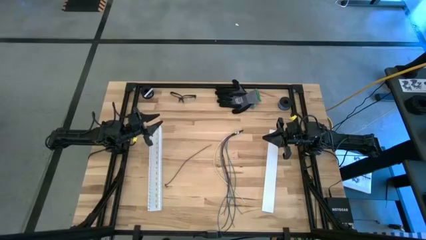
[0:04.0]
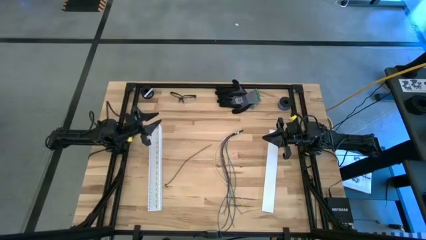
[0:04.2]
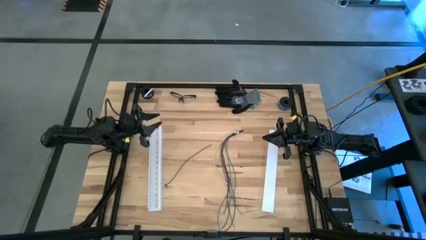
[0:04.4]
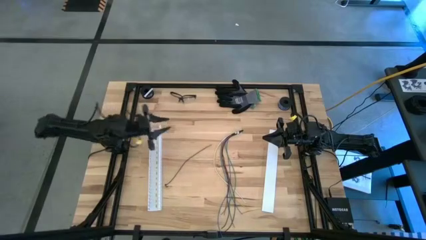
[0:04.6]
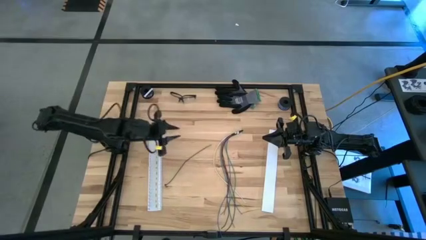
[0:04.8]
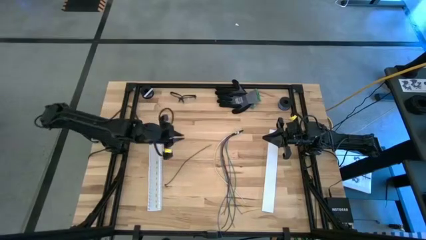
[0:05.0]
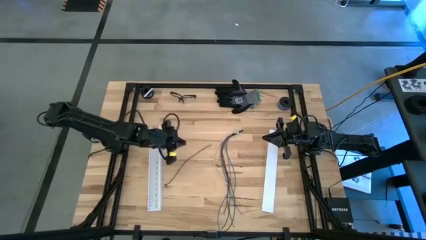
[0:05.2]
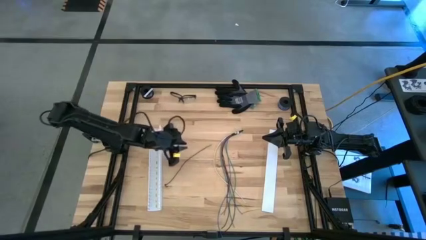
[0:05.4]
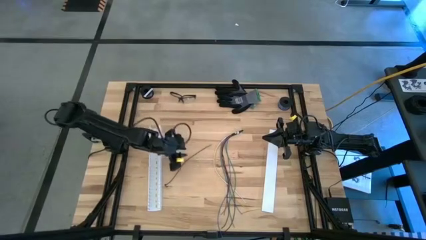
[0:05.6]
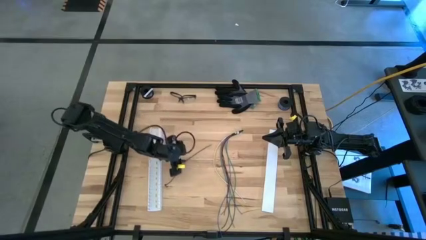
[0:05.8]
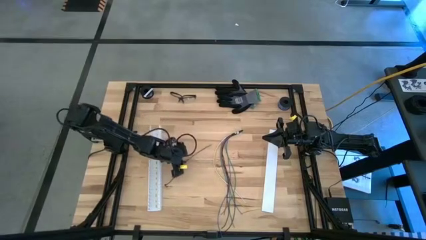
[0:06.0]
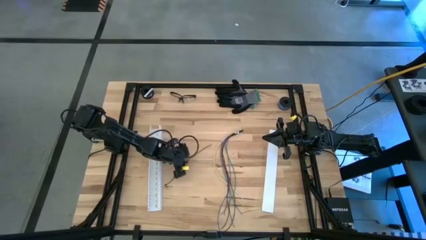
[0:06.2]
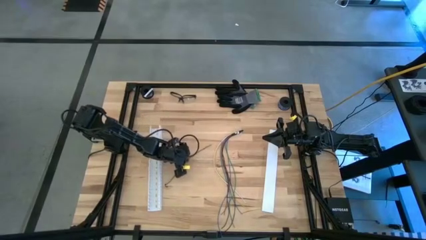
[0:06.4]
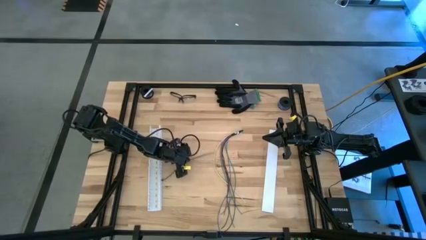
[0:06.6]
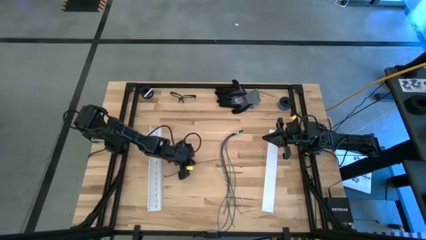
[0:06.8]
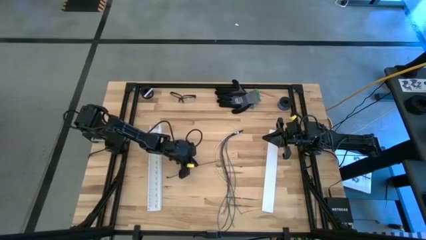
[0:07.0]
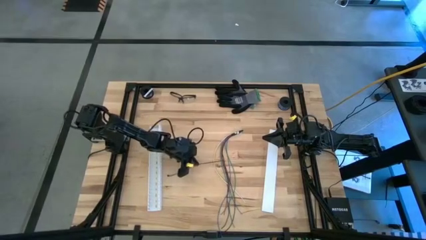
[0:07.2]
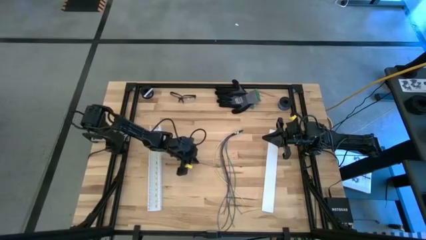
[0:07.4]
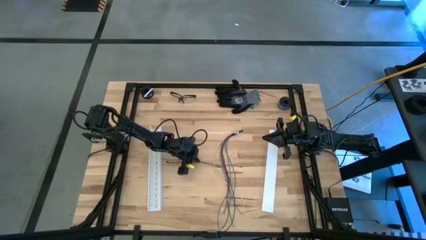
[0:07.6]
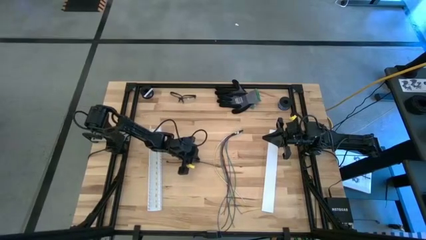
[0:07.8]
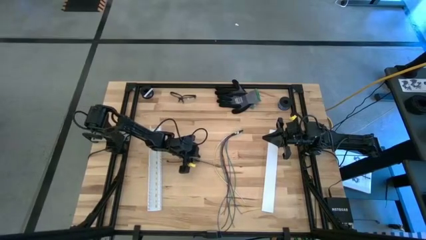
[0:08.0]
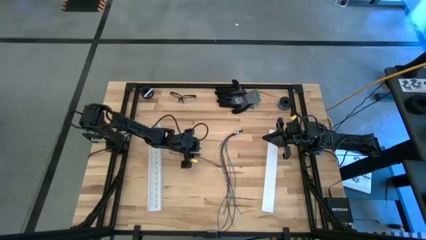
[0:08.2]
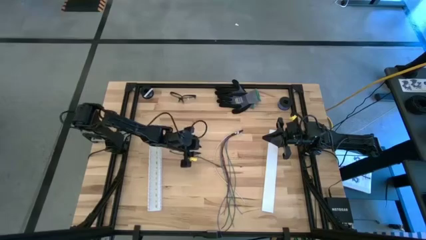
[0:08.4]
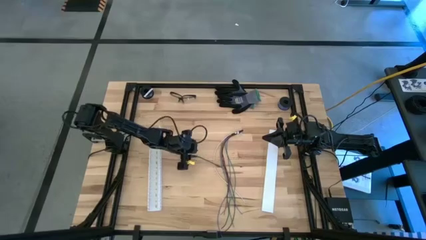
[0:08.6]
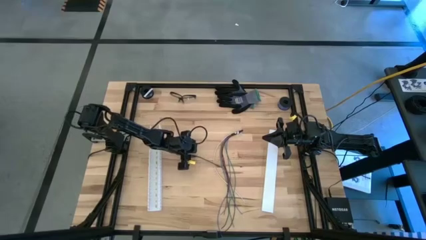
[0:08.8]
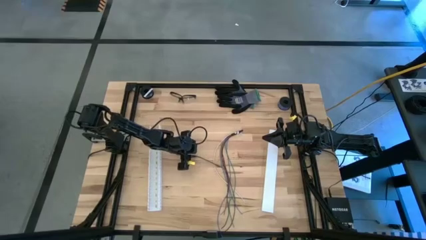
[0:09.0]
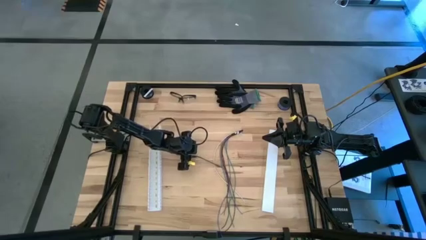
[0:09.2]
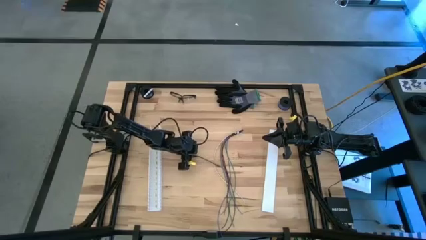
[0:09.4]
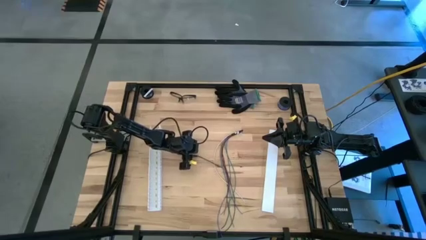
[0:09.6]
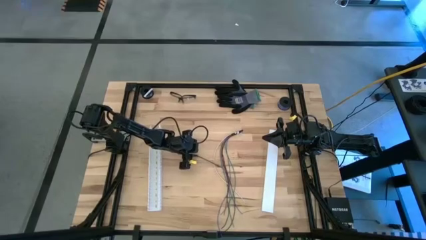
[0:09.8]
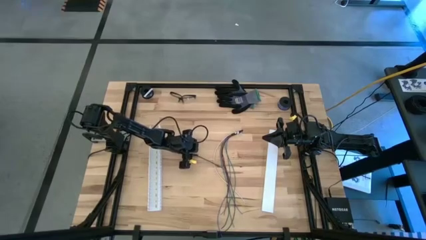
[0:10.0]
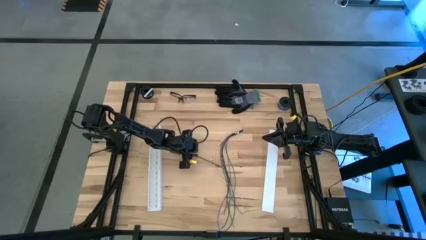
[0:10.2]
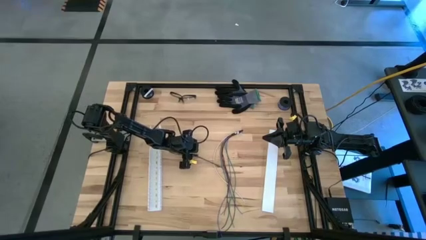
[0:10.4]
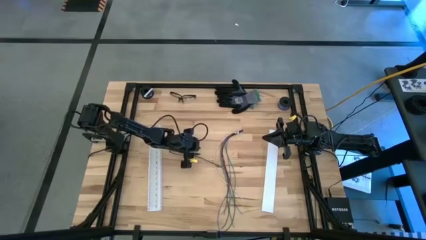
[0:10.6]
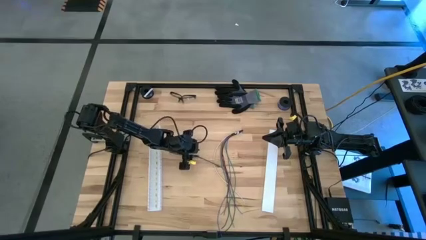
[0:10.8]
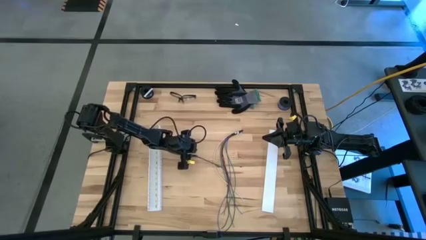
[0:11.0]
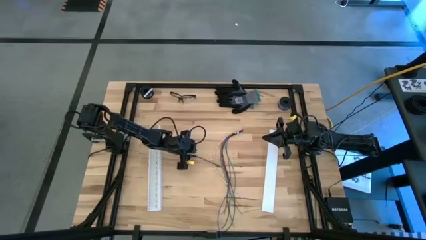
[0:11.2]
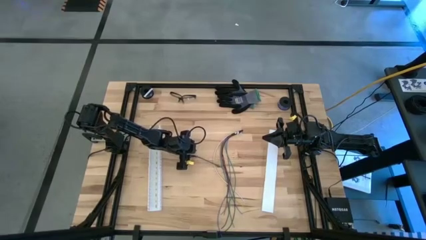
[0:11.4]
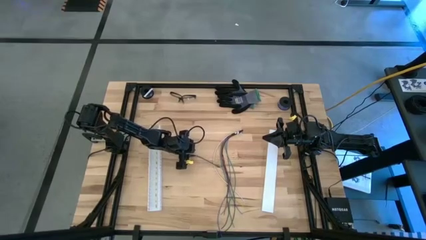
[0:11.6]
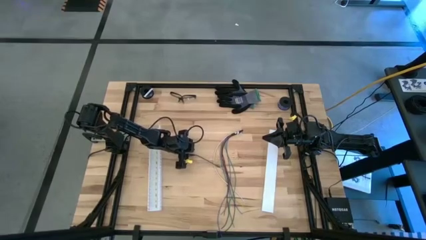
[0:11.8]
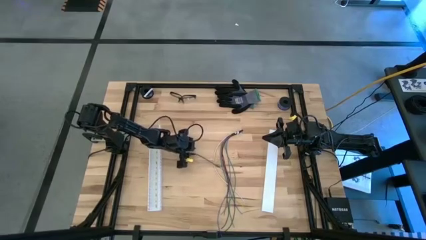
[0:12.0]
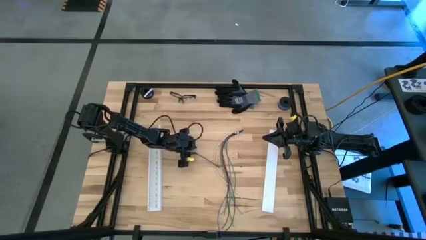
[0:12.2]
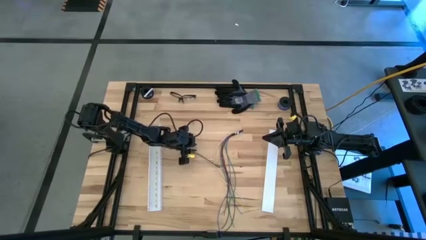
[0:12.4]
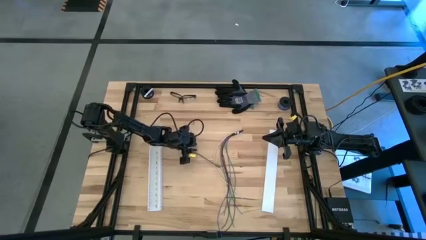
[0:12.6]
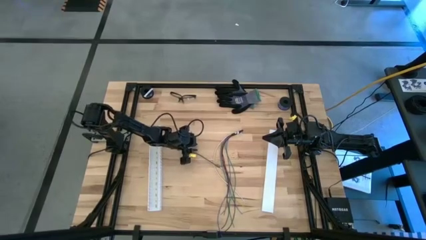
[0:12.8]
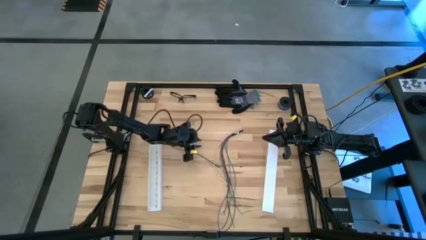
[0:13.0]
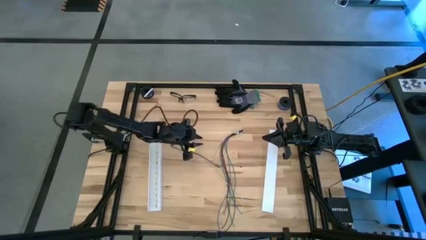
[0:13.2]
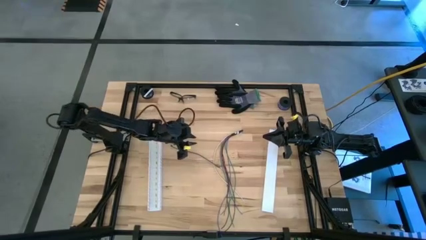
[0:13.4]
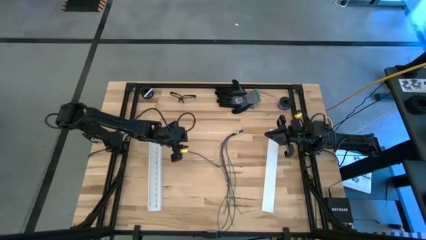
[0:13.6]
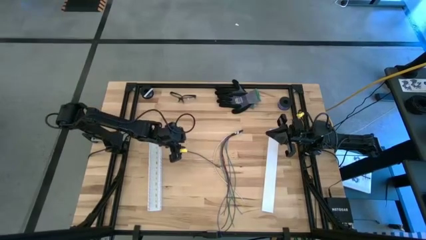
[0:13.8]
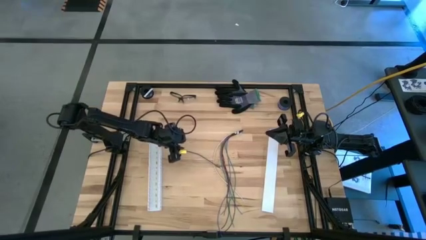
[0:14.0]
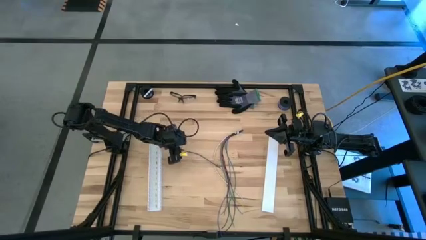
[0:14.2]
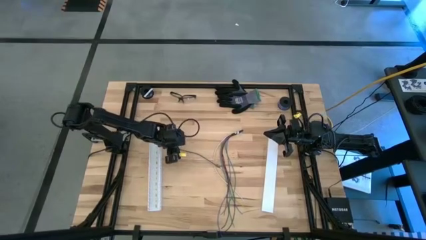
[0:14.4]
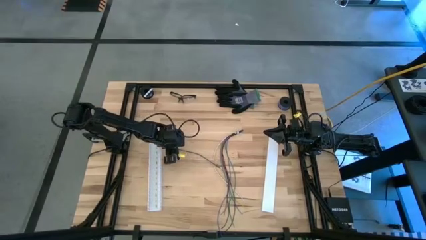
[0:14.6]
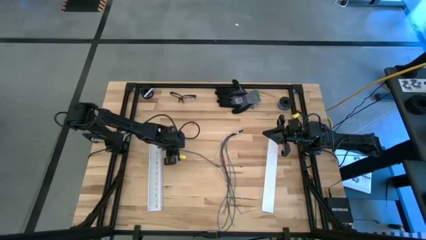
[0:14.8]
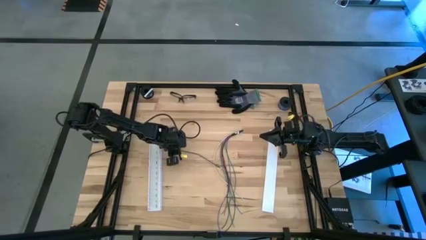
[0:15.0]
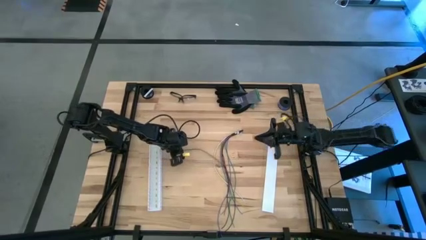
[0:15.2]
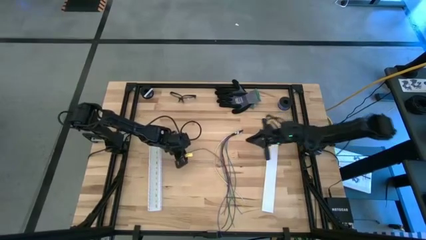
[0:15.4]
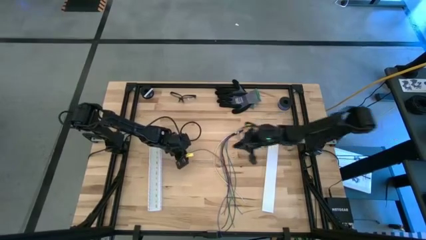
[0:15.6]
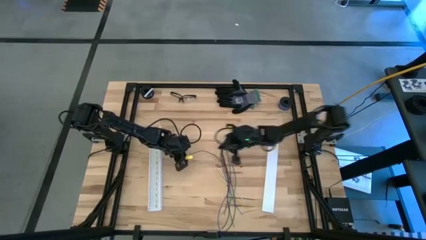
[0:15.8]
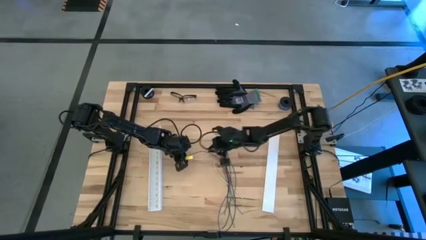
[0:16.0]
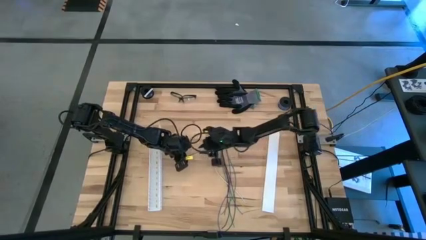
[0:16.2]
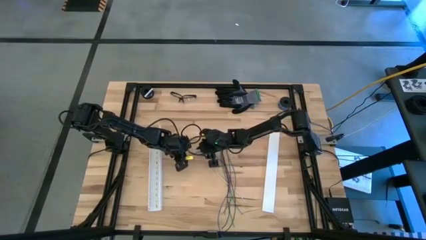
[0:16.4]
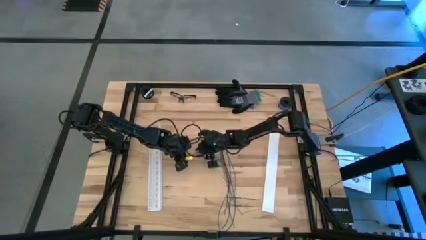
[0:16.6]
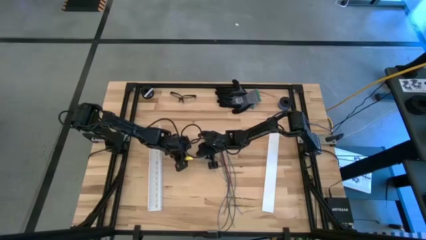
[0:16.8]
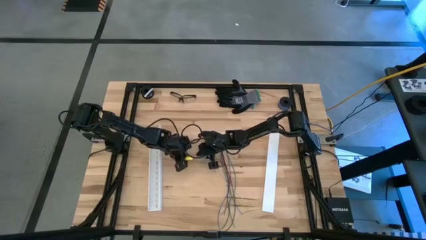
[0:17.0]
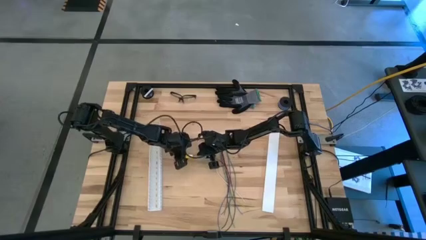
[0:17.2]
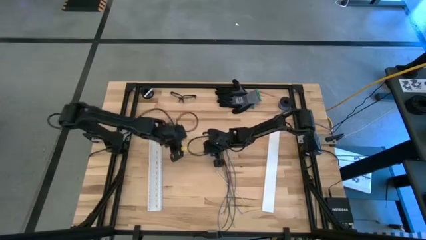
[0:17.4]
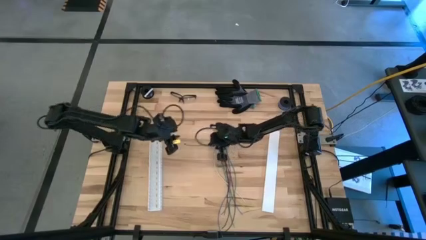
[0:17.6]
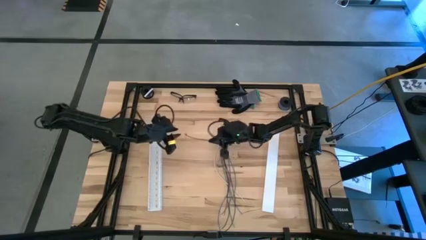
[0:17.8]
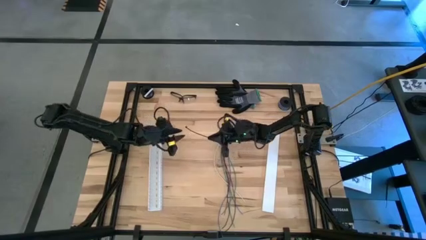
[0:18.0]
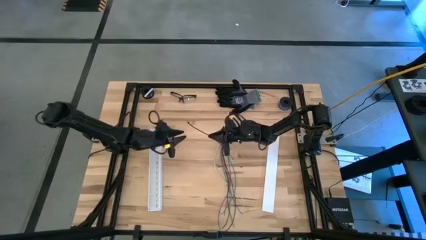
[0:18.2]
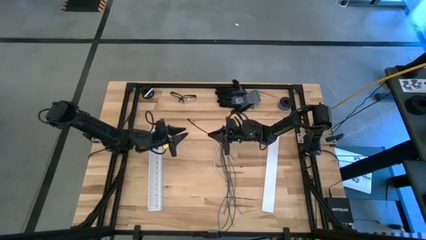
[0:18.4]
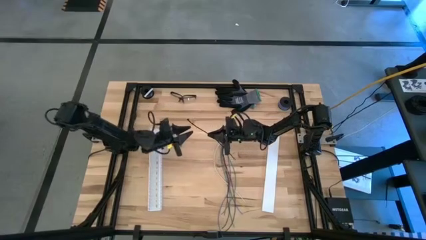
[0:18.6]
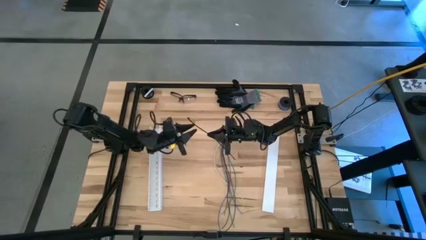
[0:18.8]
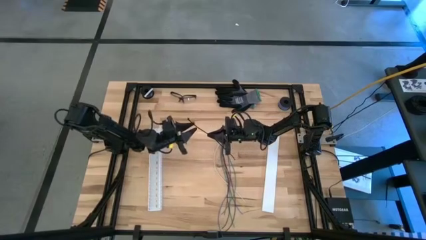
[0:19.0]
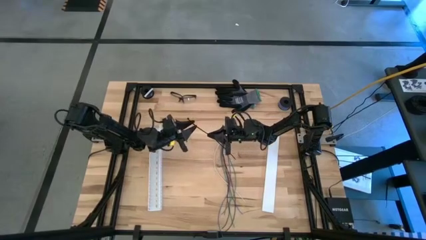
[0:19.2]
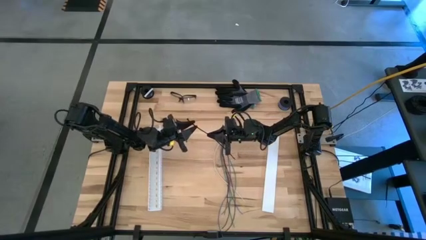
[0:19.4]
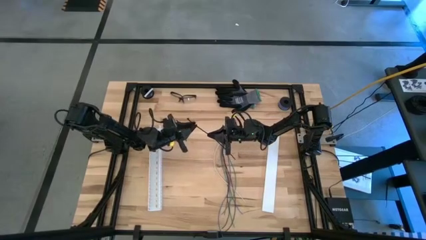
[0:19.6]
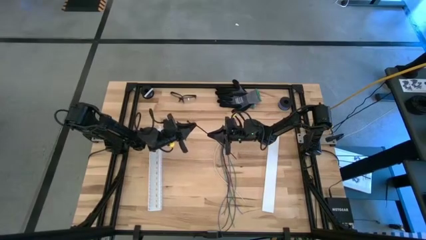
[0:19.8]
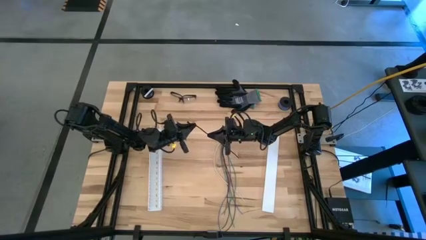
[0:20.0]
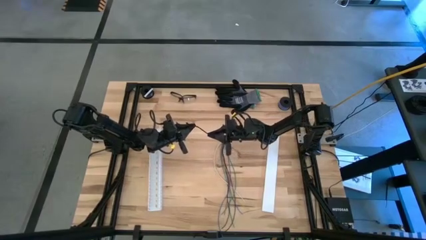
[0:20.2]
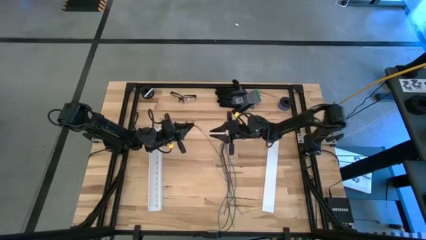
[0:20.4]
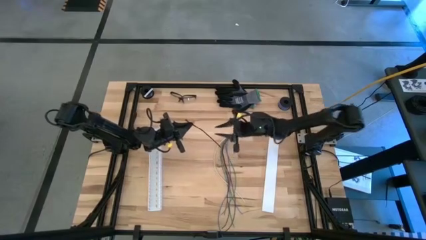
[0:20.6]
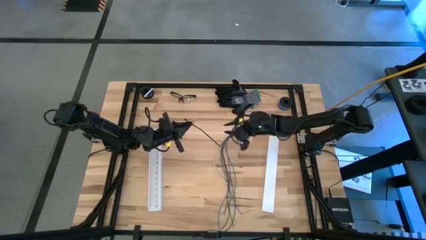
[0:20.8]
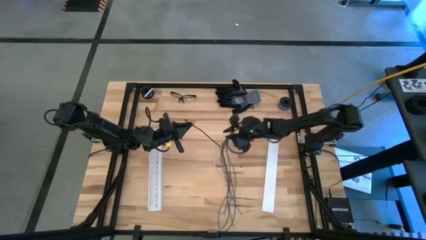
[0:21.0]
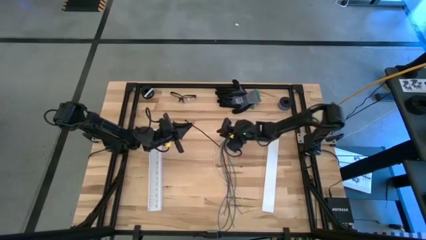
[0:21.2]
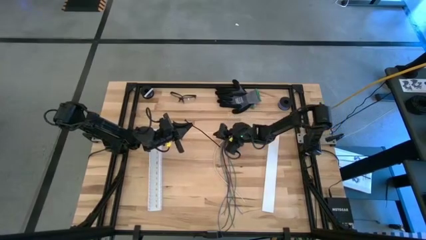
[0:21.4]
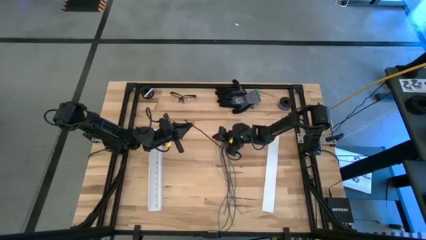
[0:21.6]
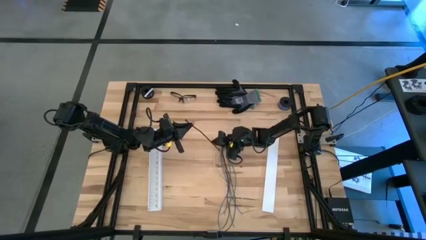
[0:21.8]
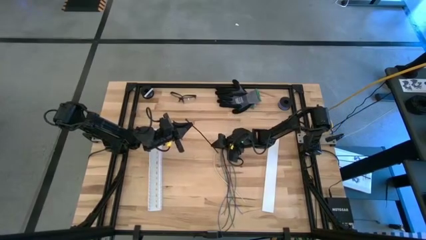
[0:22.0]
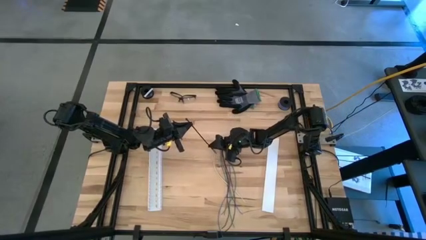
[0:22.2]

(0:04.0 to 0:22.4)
Task: Ziptie cables
Close the zip tie
